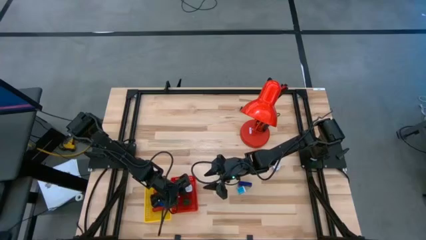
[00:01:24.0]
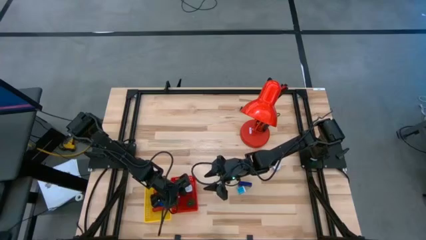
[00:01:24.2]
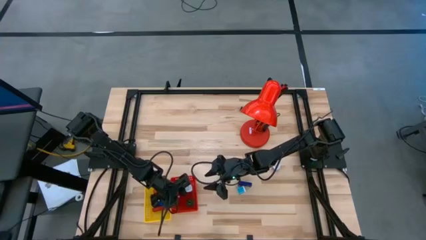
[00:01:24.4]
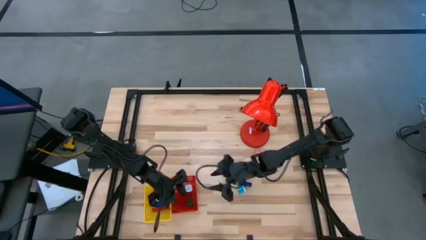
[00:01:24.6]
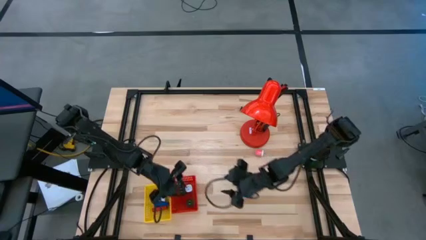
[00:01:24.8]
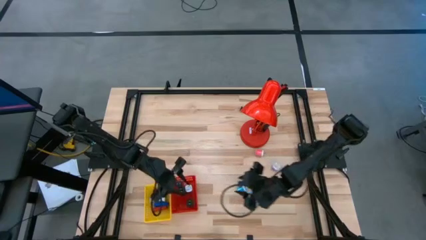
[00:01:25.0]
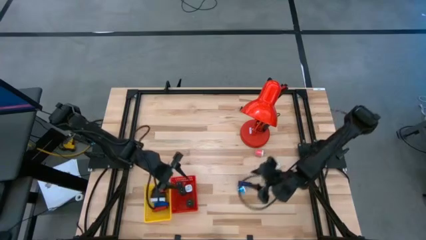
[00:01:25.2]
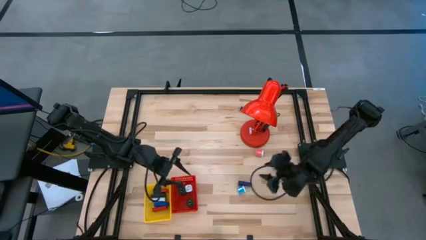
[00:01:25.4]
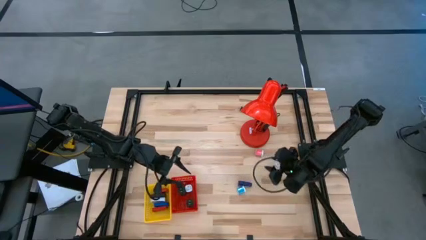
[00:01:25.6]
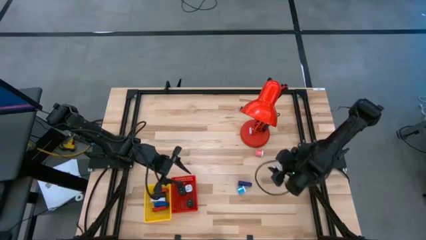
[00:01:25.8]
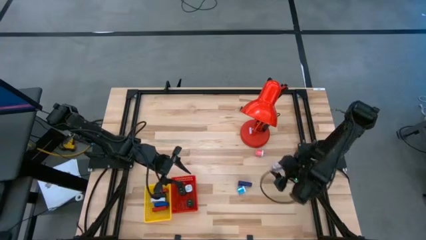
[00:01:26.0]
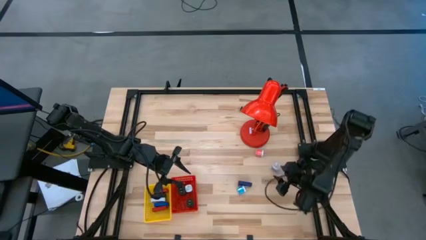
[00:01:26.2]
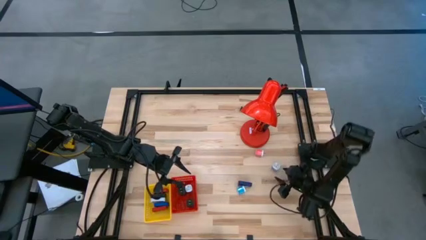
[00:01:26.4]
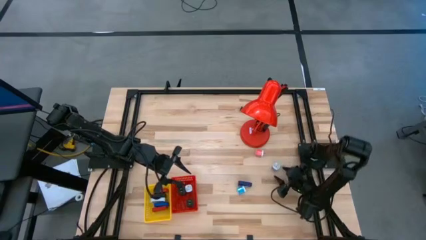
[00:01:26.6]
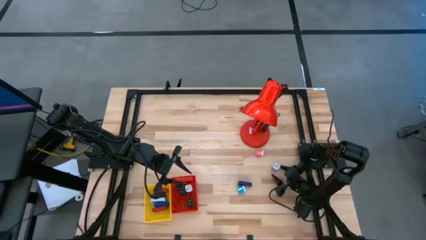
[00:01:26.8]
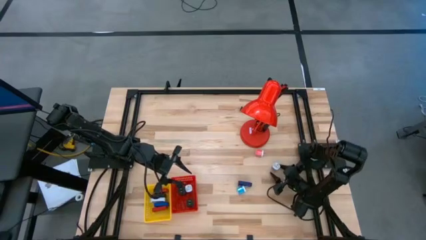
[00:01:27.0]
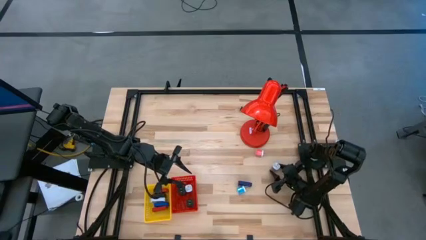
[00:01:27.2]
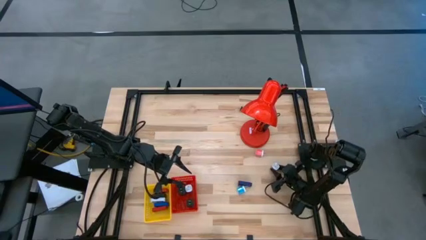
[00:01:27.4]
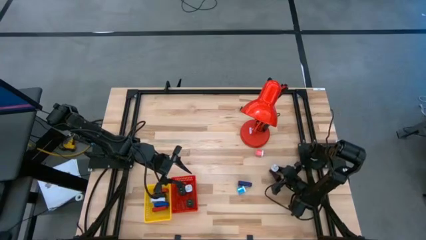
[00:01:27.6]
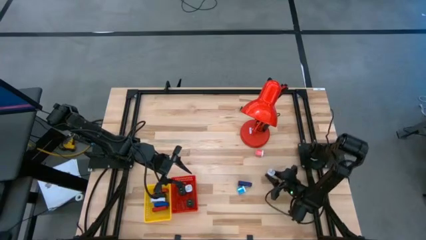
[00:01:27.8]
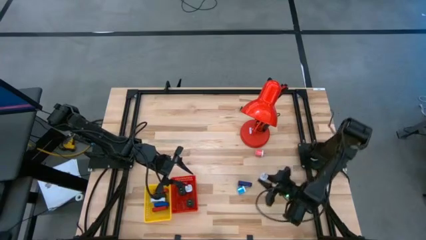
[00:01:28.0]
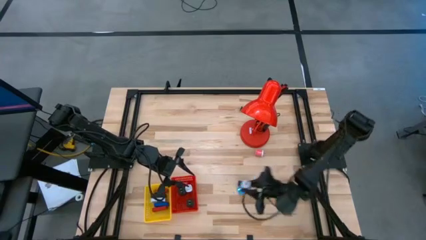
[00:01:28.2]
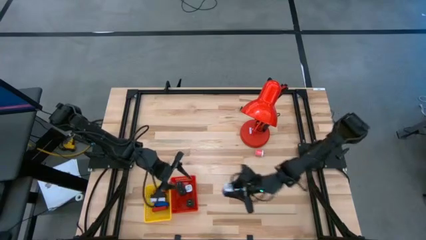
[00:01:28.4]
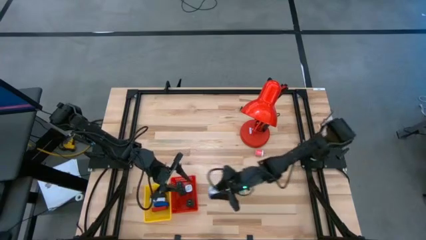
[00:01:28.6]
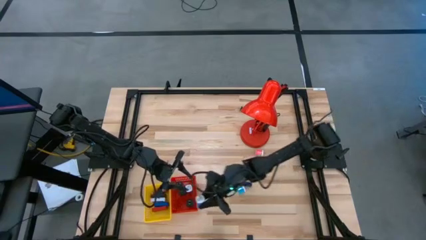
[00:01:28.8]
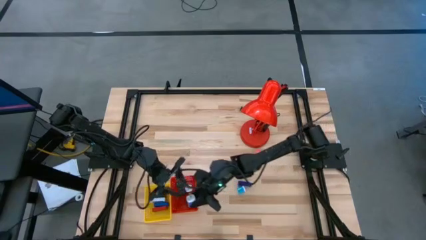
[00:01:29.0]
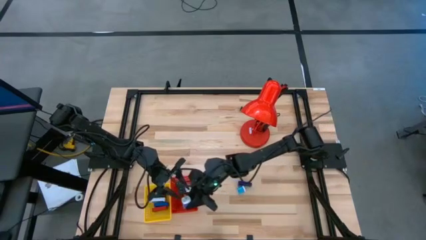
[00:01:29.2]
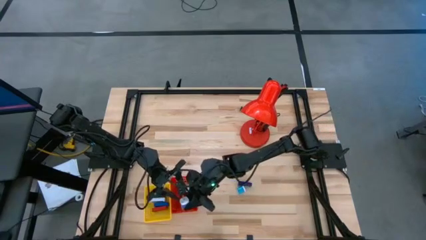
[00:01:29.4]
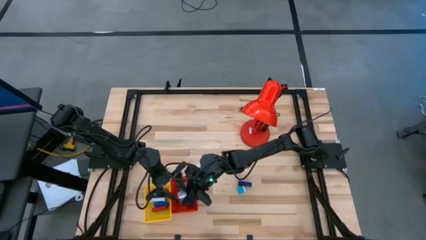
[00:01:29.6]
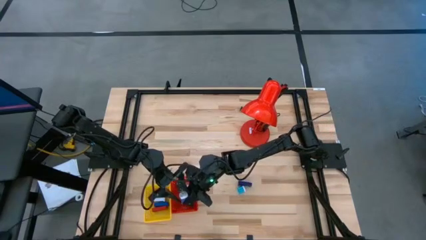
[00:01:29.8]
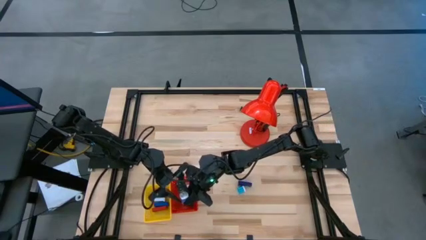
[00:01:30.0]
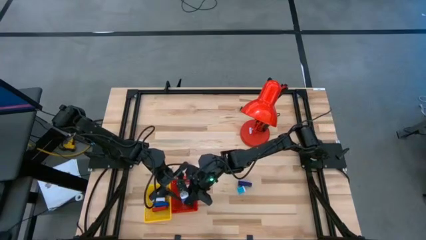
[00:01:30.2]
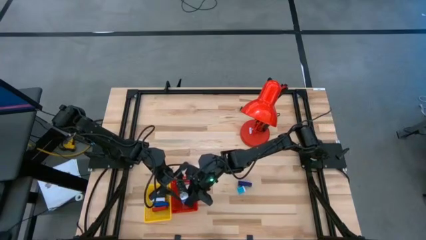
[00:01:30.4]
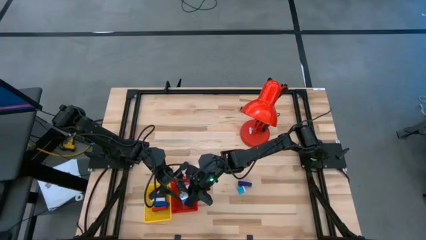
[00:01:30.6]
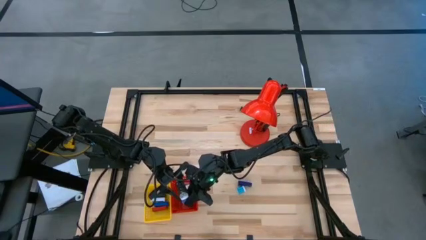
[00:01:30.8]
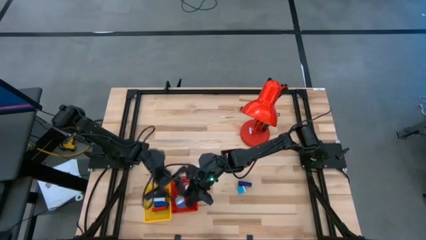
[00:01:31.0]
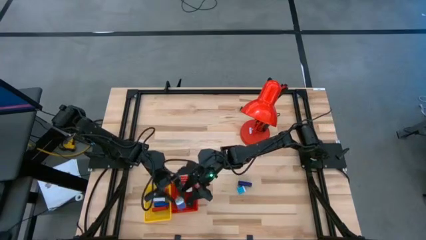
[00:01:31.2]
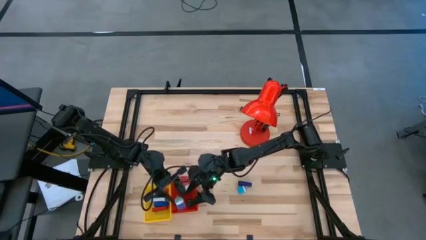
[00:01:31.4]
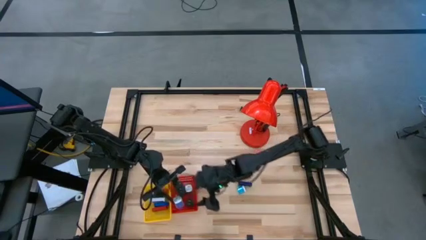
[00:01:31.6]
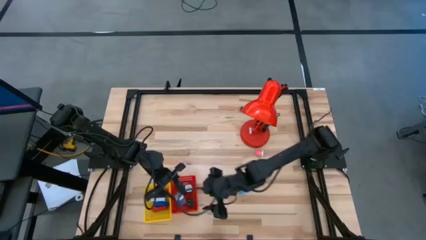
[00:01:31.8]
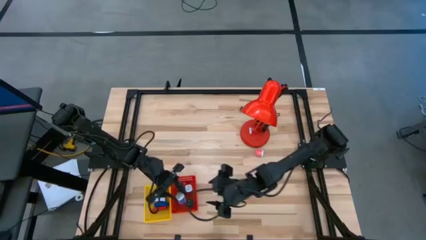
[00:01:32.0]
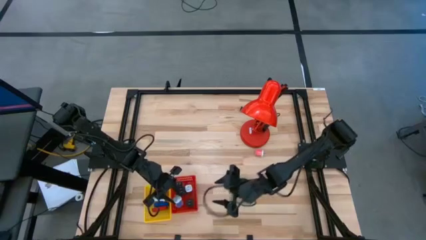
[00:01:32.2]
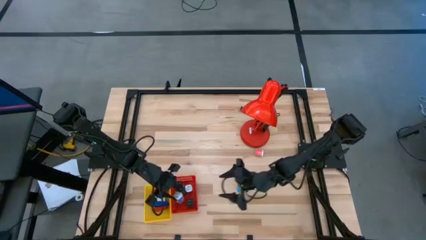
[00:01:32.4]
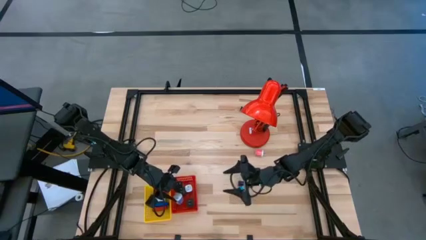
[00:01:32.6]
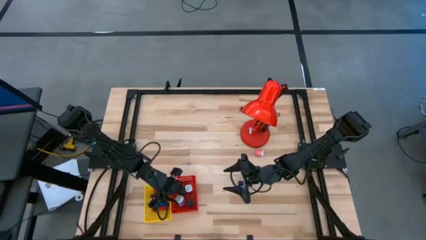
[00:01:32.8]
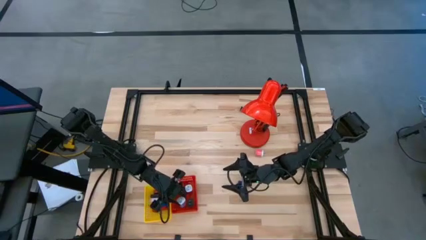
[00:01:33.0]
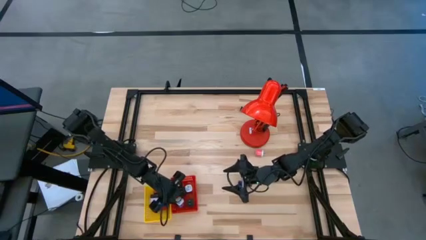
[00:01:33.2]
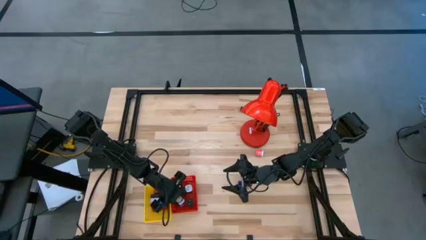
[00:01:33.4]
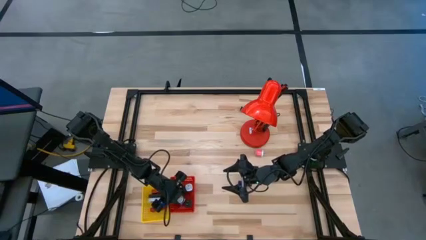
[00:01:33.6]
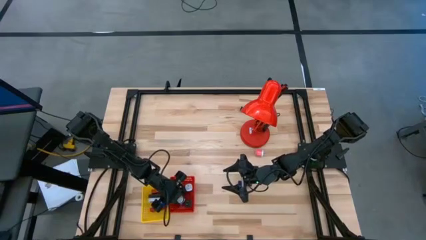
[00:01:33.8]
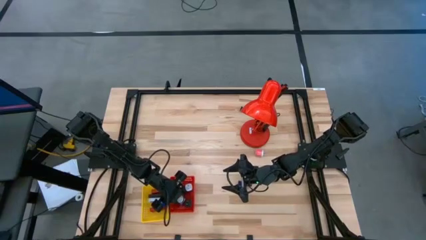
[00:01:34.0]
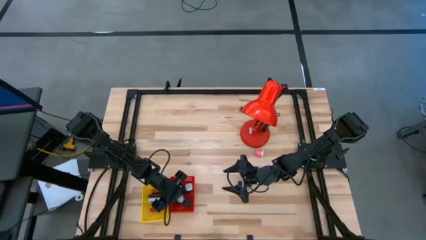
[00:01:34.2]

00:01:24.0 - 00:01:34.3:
Task: Pick & Place Office items
Put the purple charger adapter into the red bin
